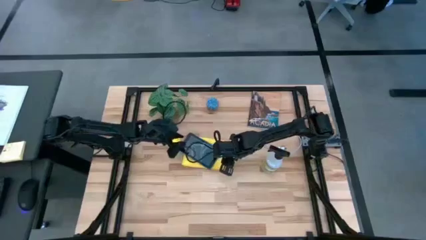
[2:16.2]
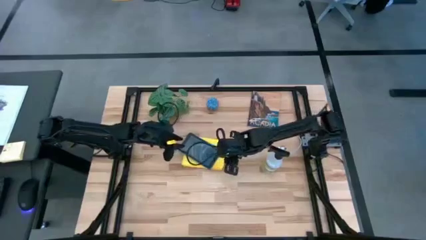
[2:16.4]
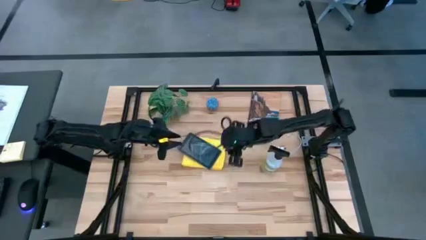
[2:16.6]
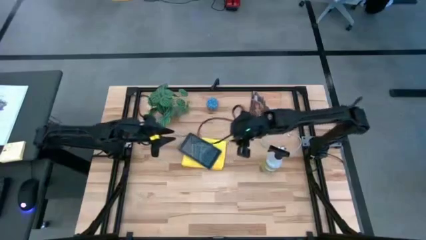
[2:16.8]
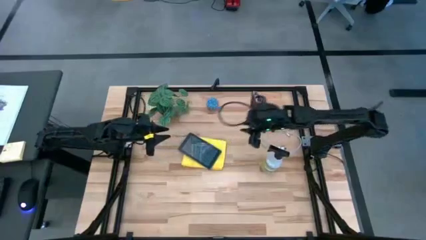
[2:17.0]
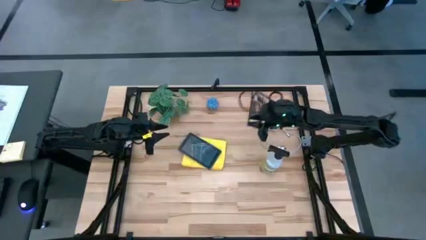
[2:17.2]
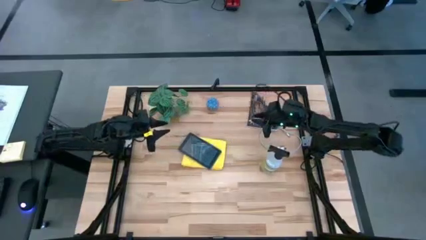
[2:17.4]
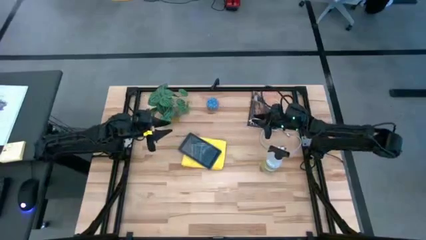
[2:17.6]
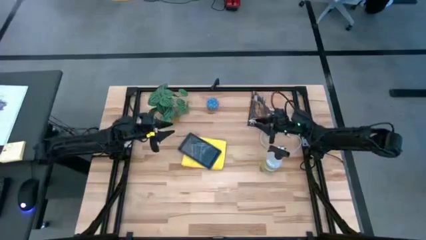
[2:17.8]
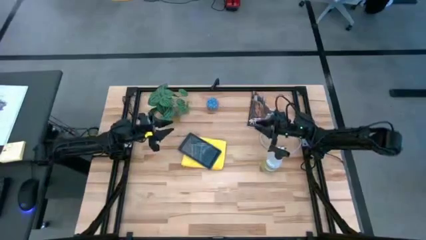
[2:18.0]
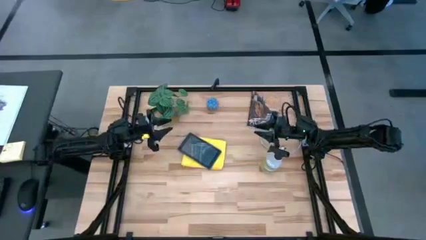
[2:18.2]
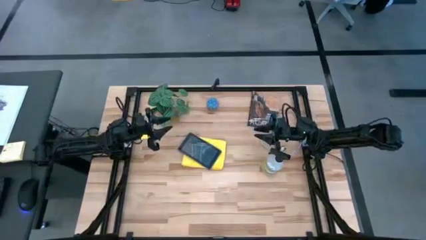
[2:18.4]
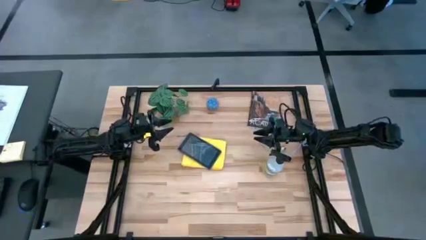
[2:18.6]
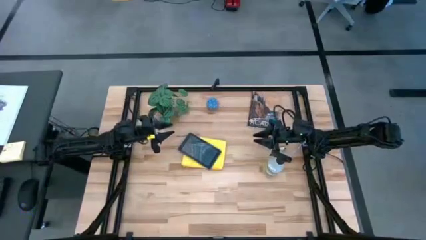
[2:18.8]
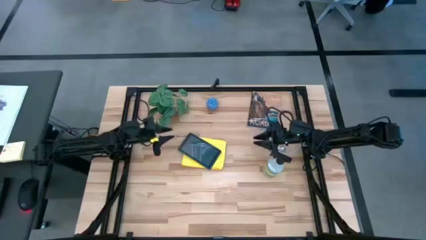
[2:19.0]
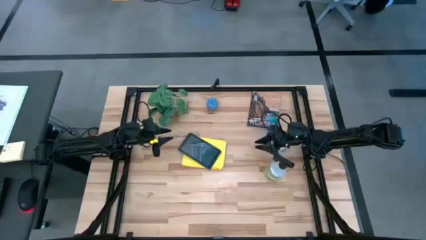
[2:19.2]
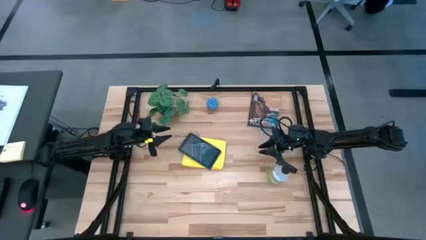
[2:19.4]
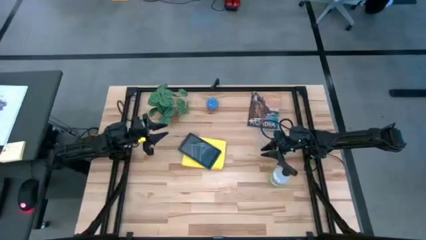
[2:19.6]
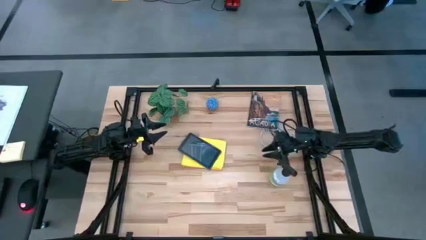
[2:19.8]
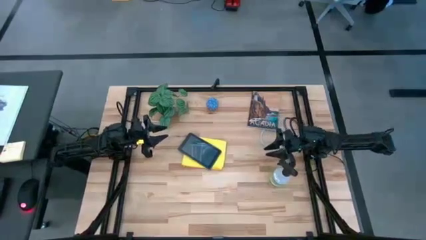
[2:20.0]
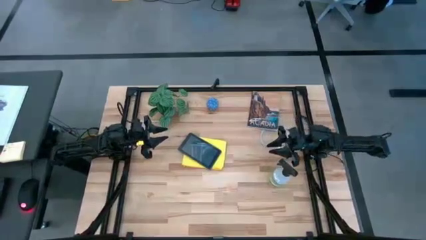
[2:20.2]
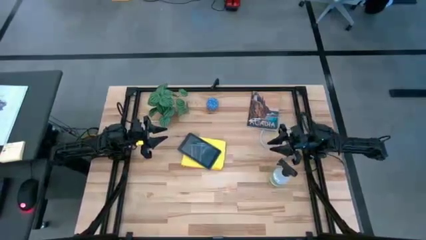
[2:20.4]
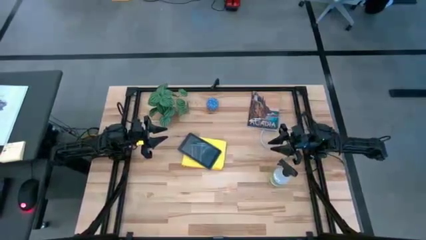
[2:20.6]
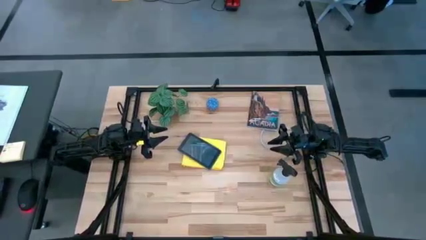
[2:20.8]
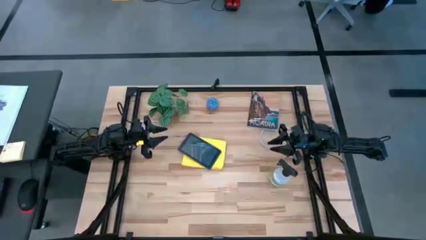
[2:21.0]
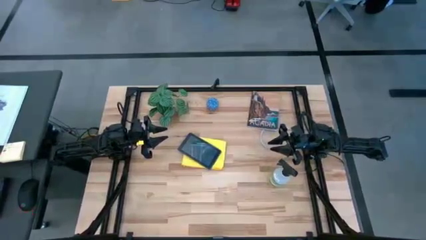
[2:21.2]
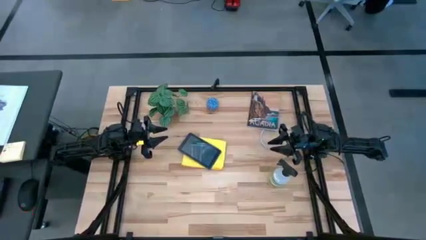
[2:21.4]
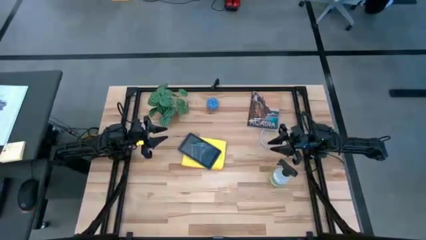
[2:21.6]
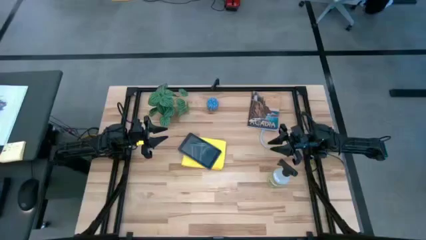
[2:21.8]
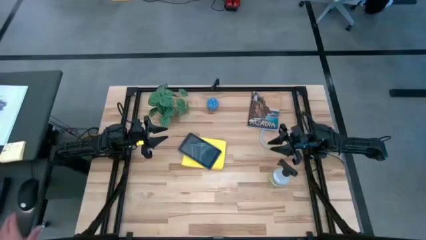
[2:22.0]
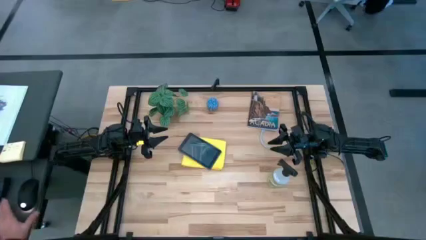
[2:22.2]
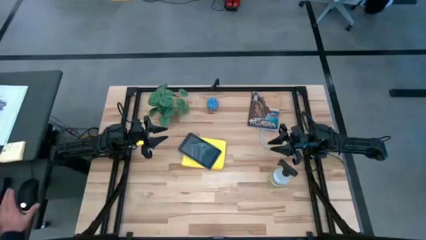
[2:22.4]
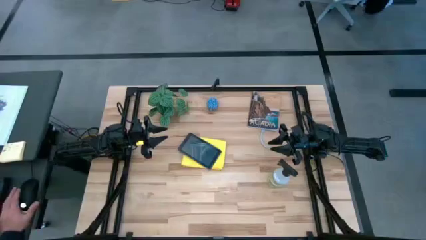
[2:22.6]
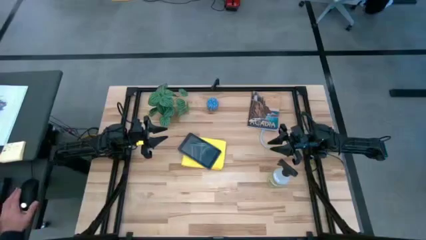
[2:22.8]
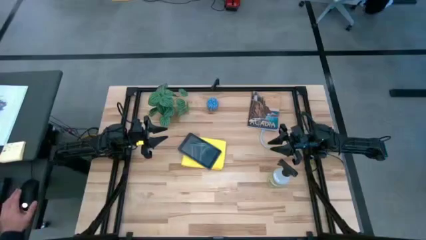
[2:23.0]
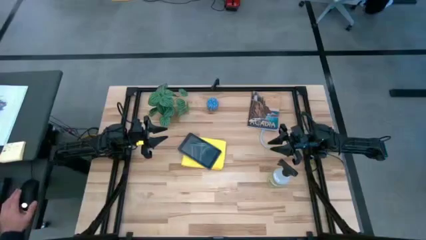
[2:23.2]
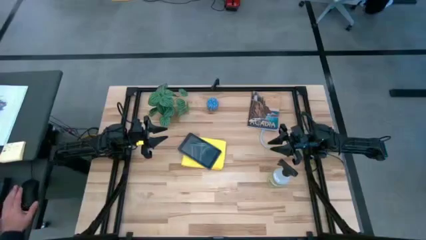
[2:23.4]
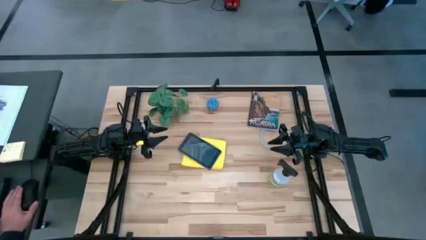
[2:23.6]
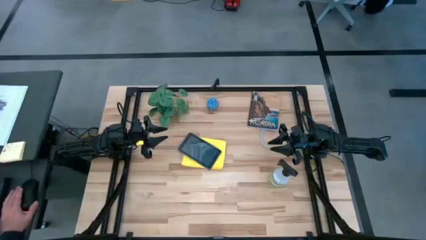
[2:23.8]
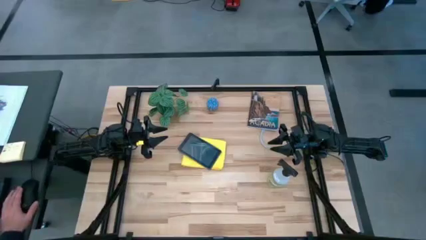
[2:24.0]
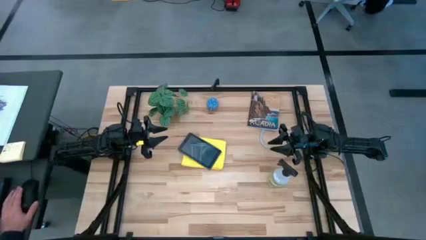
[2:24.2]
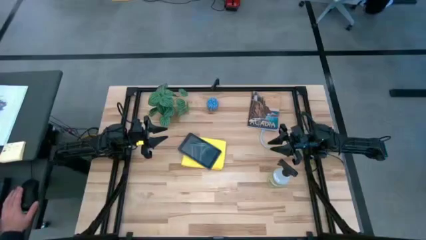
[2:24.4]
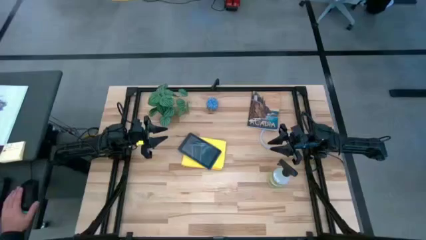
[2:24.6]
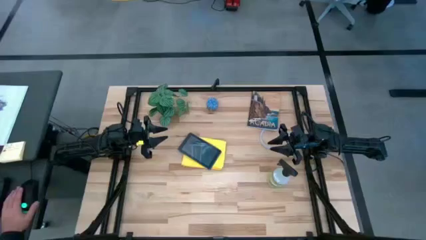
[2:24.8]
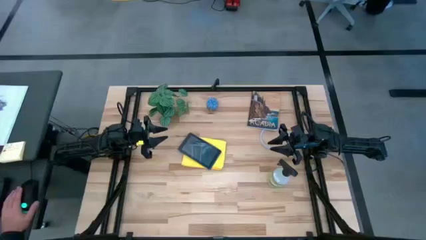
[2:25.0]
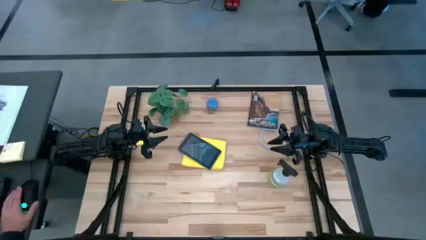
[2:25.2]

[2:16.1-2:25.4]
Task: Apply microfiber cloth
Return to Home Position

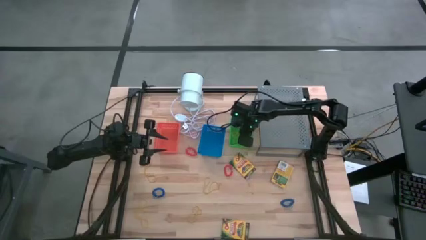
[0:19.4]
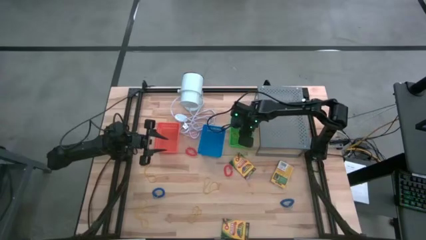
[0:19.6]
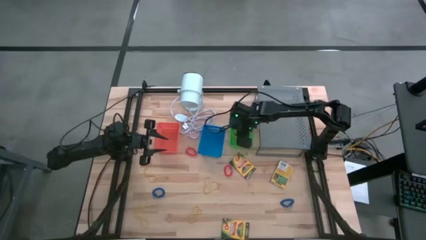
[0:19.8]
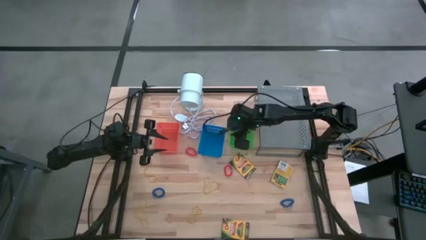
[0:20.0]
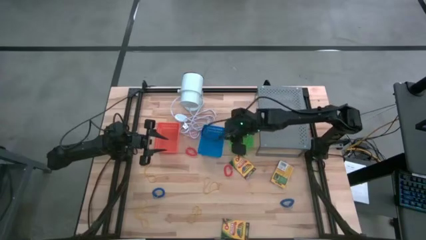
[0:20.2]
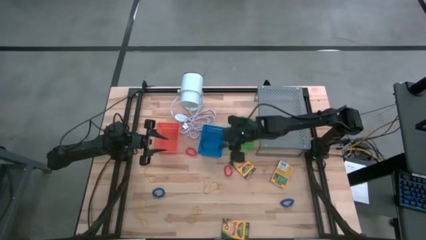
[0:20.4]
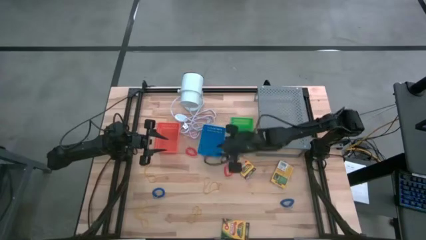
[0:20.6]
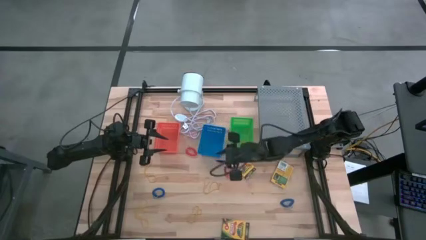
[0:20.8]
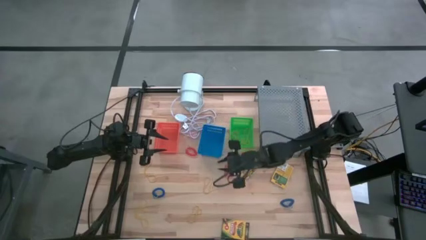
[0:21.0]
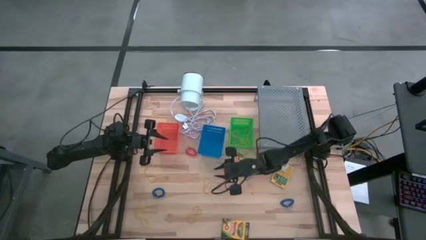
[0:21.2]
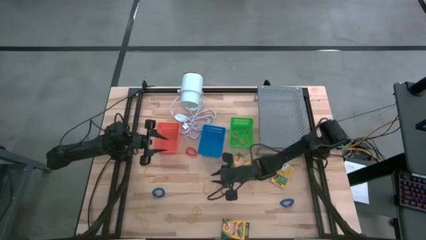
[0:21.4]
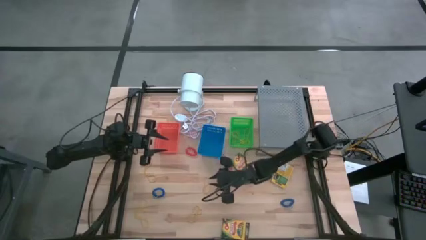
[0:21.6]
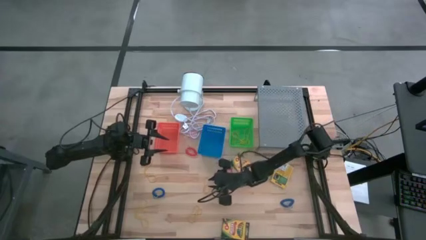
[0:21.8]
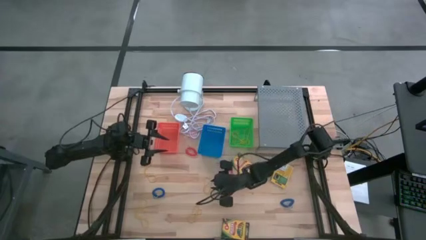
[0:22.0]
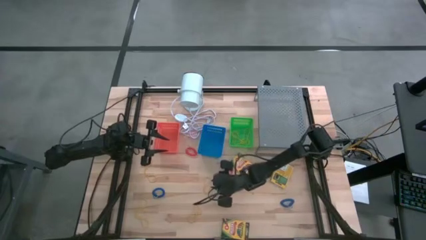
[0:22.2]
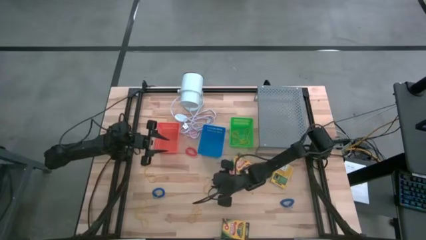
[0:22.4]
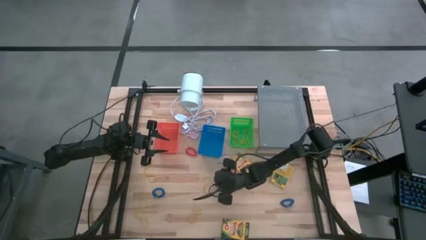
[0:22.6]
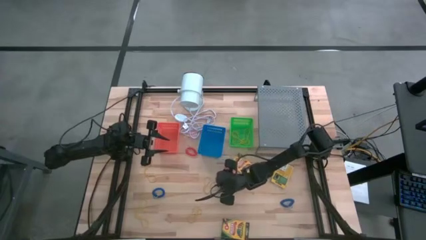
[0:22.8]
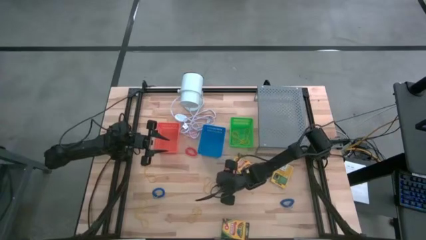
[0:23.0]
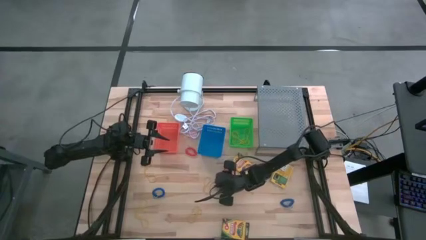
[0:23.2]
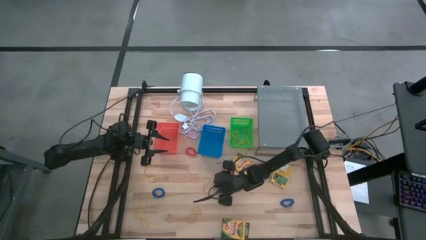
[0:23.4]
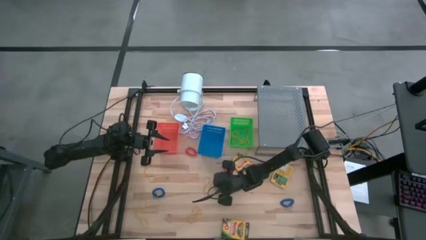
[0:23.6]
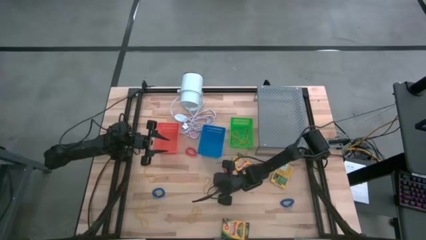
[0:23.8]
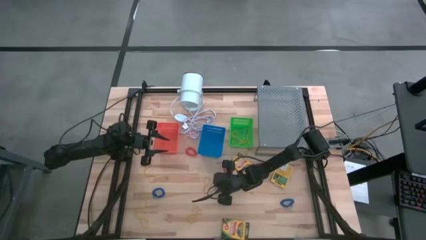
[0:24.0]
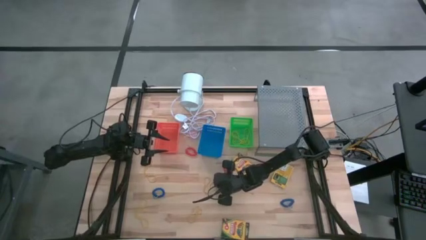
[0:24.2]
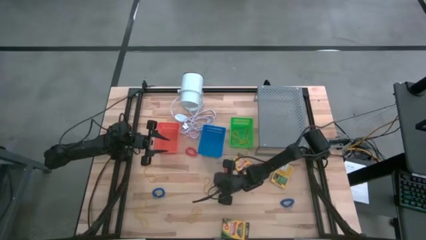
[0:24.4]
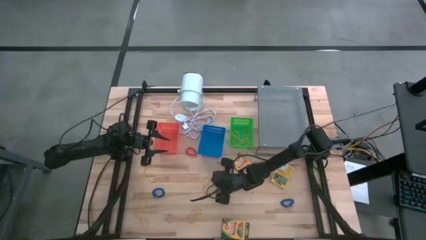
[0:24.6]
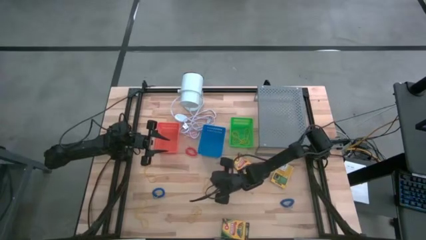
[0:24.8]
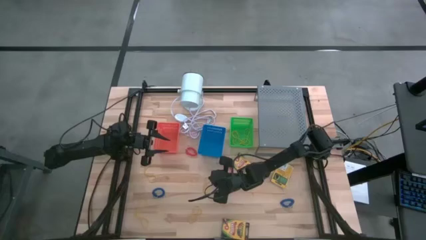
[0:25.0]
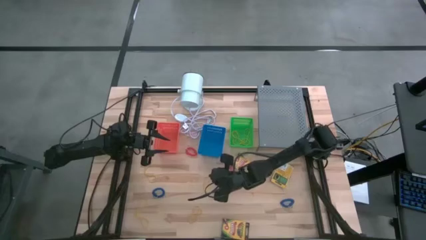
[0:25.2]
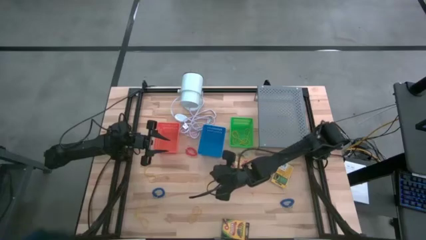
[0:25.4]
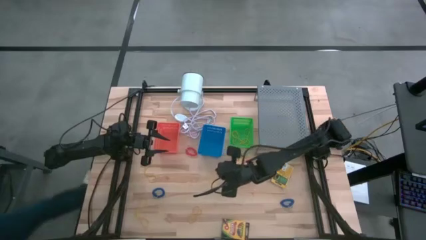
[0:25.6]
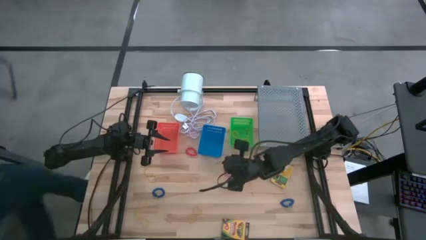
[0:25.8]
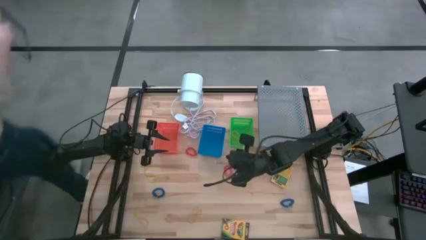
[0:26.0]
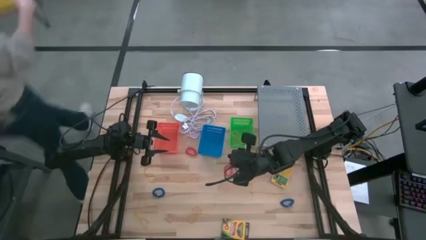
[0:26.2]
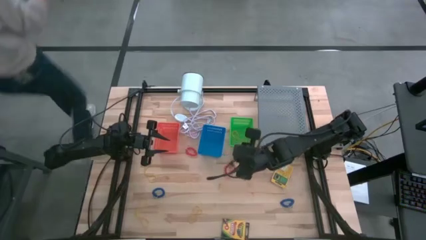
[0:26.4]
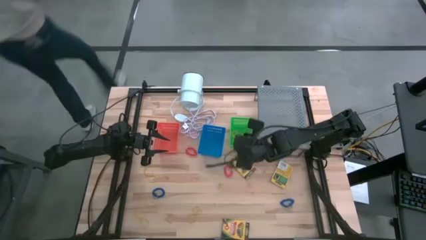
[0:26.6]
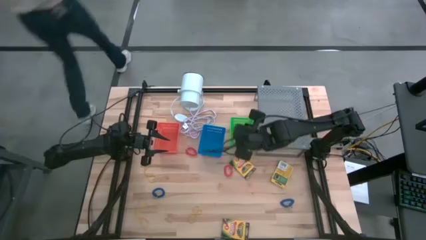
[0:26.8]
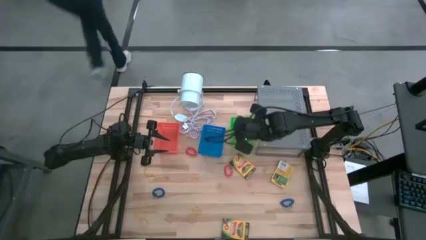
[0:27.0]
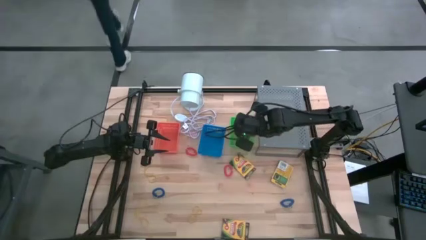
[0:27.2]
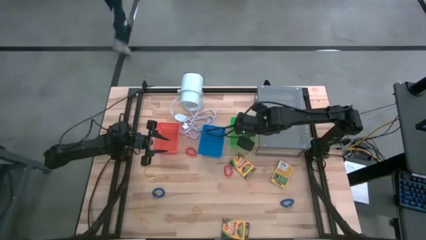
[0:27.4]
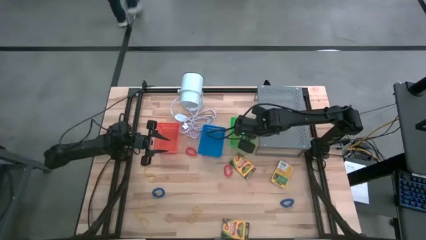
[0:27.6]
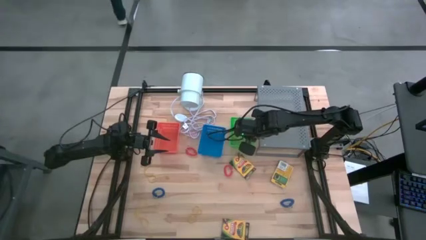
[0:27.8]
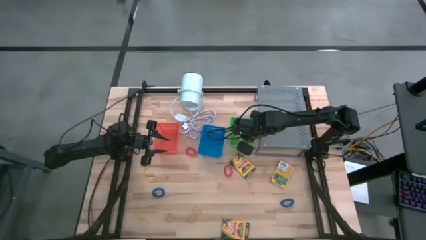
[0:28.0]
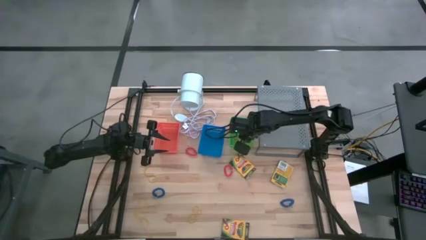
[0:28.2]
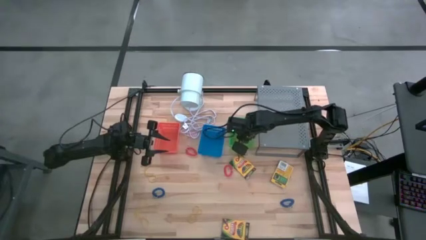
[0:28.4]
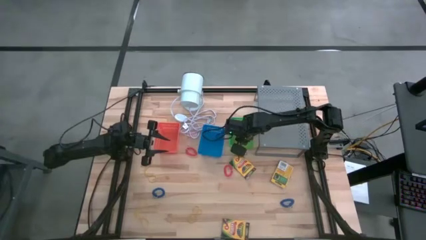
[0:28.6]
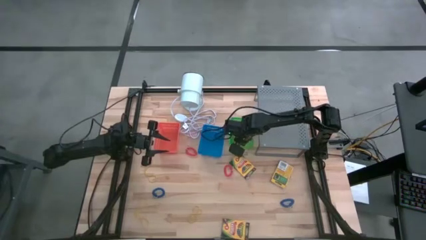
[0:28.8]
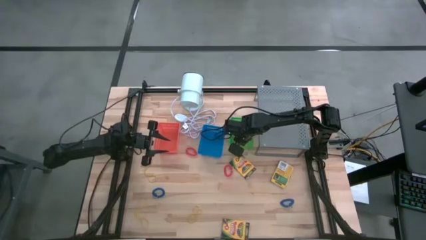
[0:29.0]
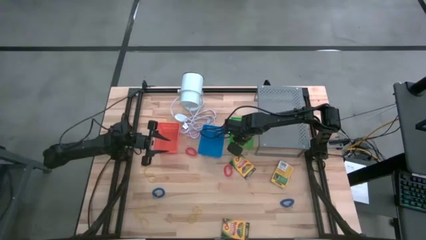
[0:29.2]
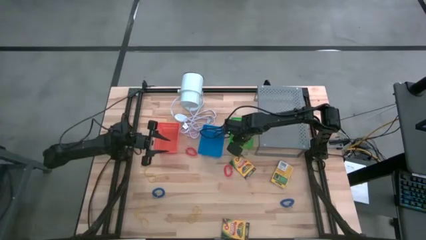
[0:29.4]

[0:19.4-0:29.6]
Task: Pick & Place Office Desk Supplies
Put the yellow rubber band into the green bin
